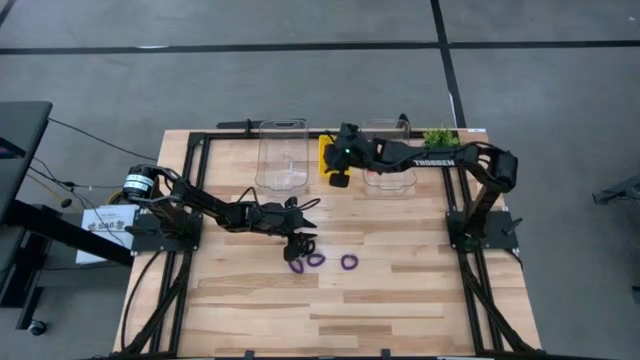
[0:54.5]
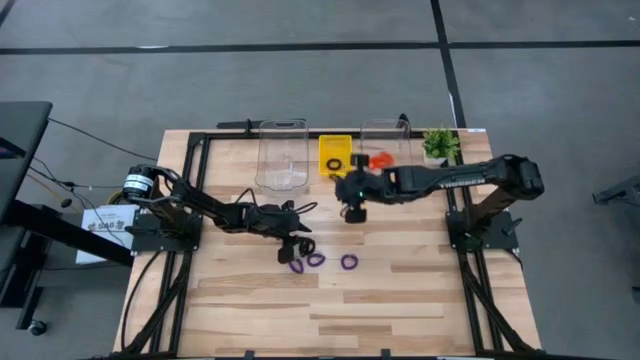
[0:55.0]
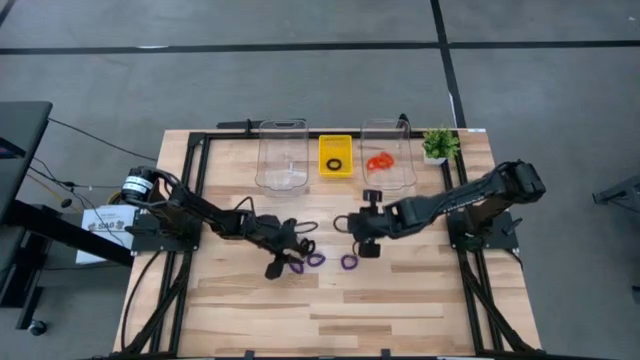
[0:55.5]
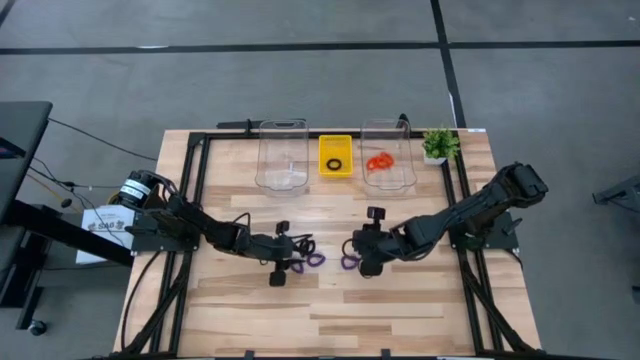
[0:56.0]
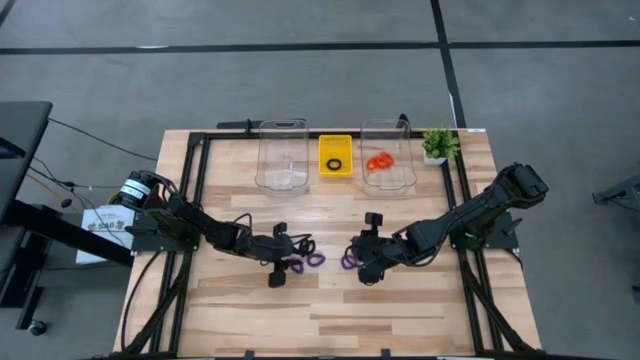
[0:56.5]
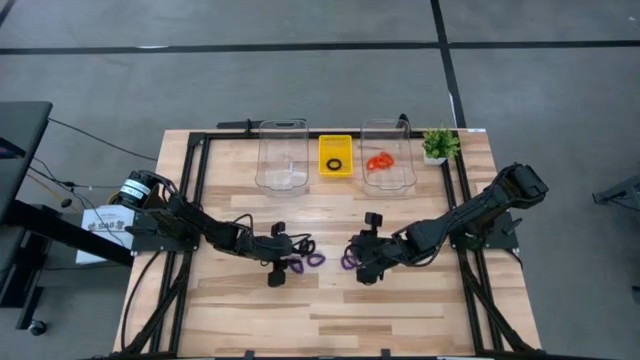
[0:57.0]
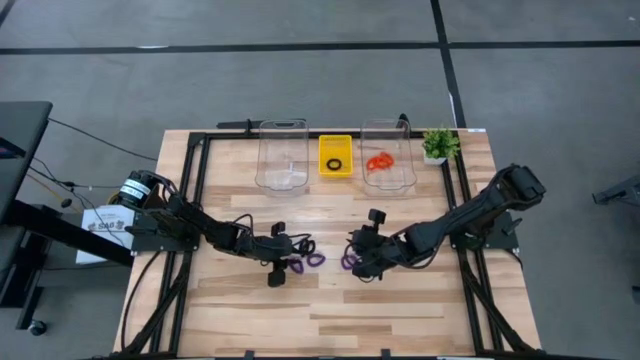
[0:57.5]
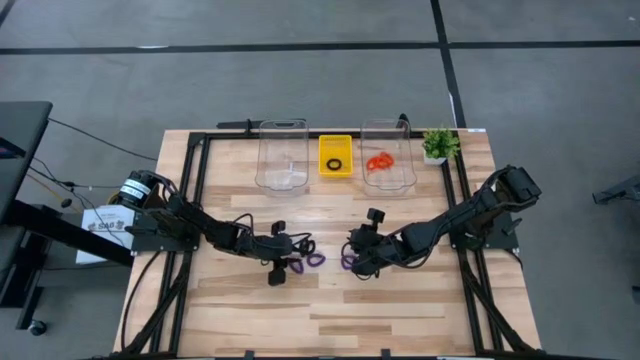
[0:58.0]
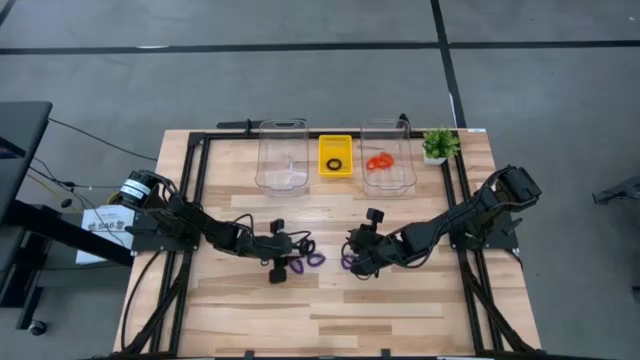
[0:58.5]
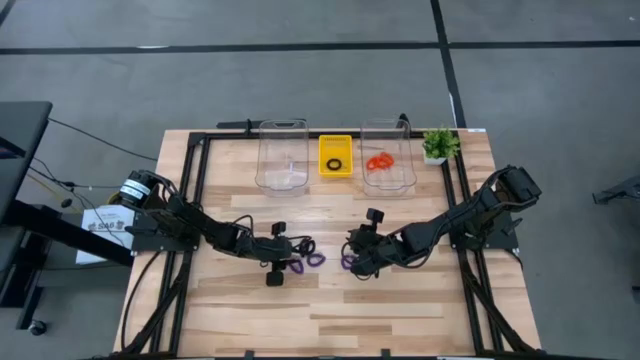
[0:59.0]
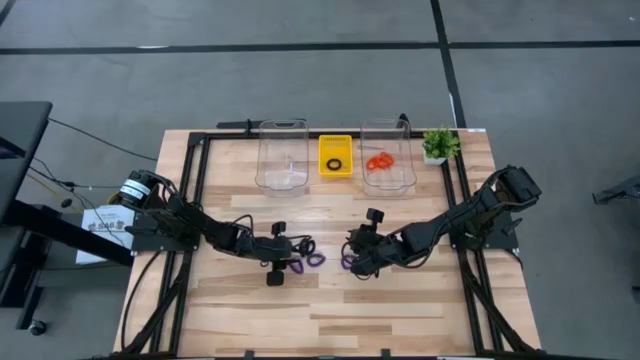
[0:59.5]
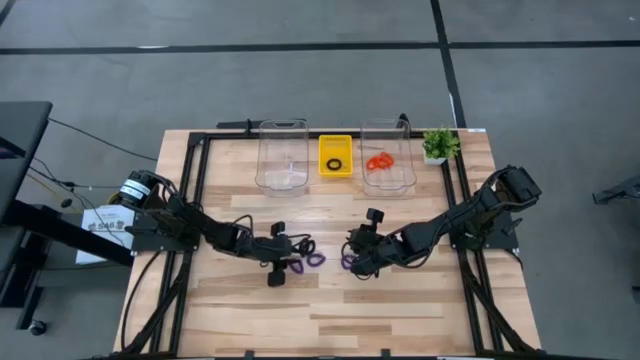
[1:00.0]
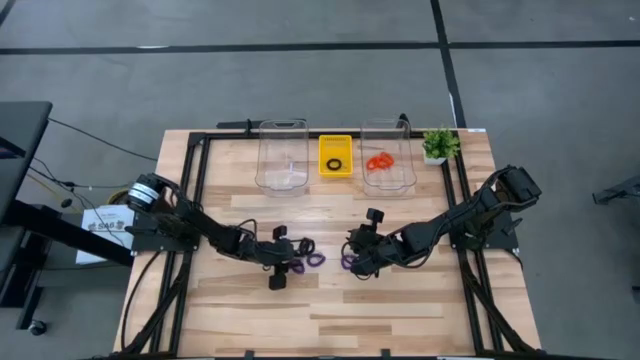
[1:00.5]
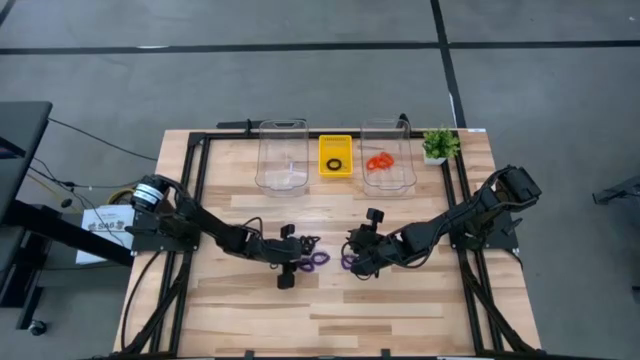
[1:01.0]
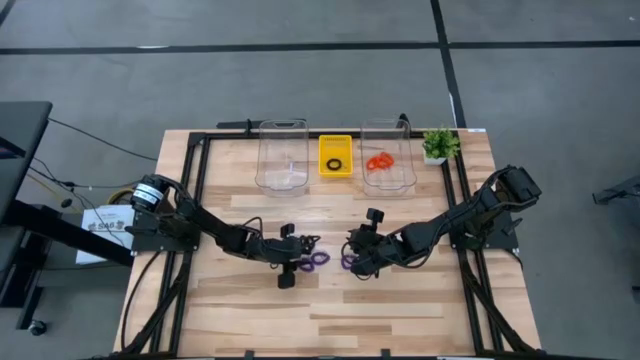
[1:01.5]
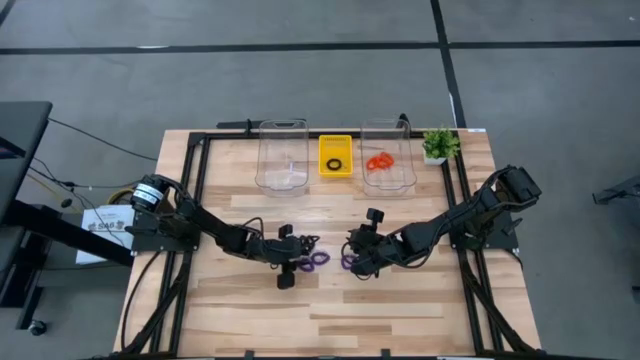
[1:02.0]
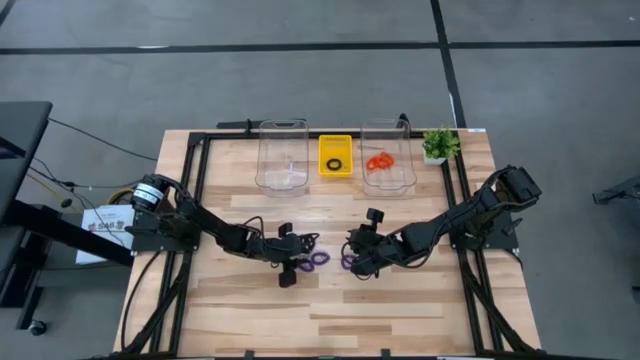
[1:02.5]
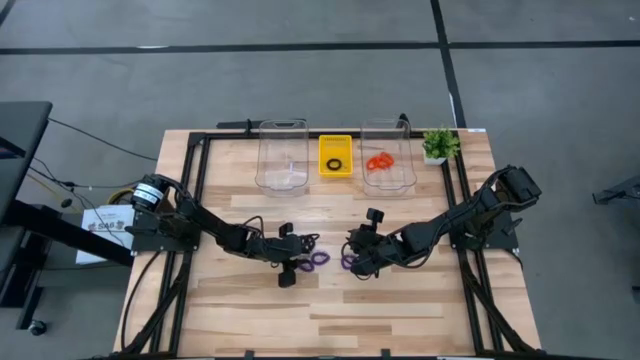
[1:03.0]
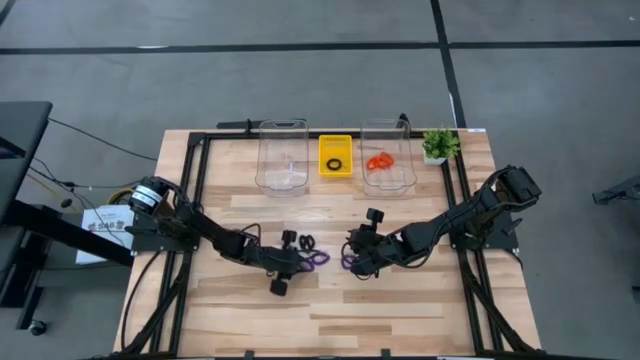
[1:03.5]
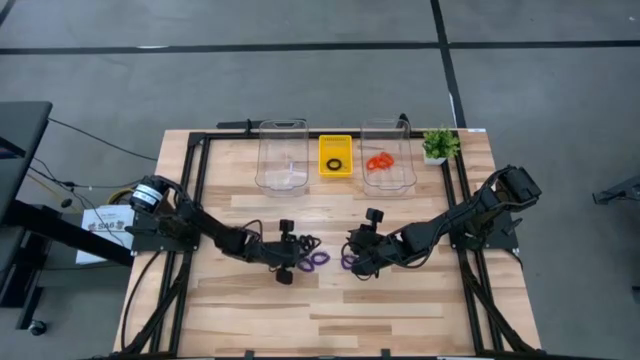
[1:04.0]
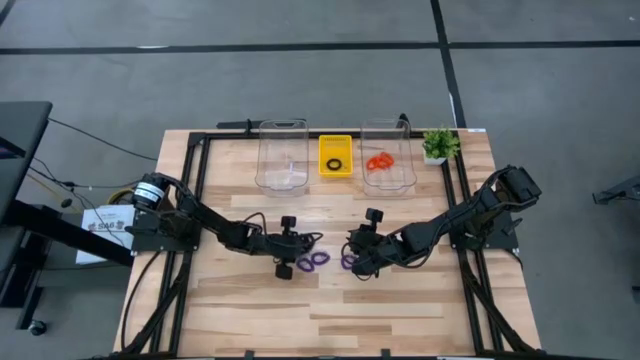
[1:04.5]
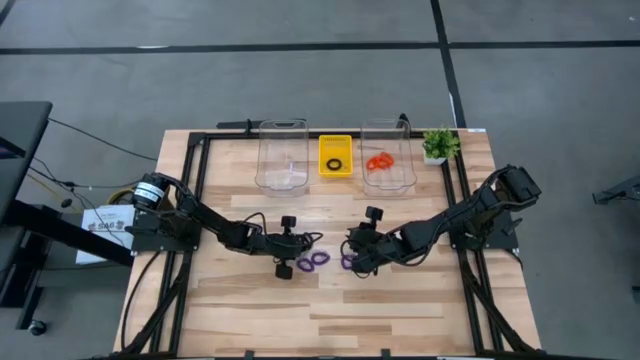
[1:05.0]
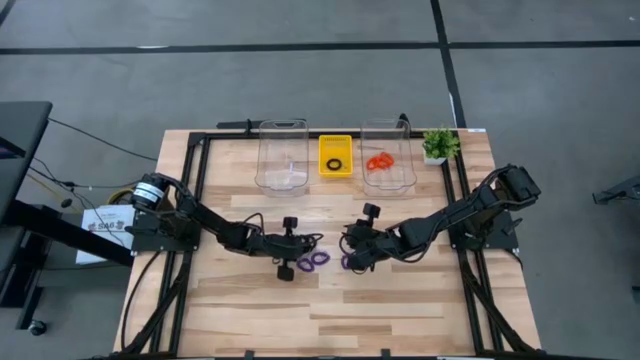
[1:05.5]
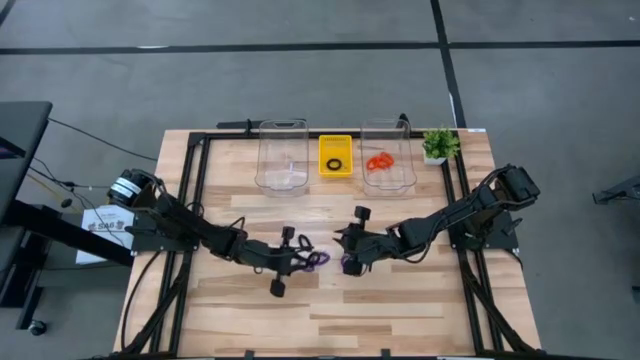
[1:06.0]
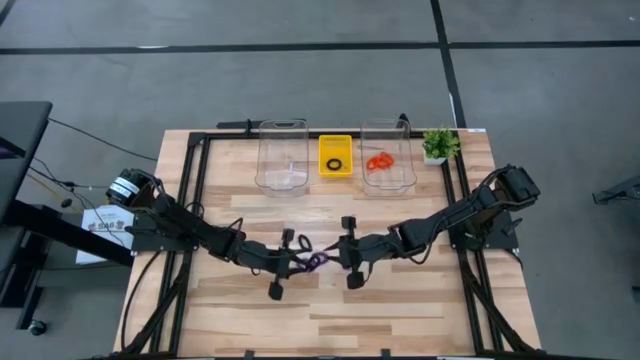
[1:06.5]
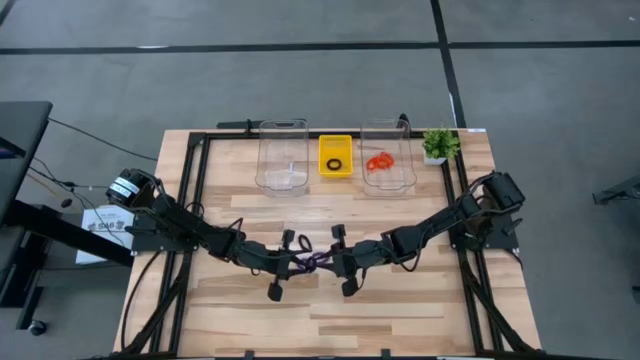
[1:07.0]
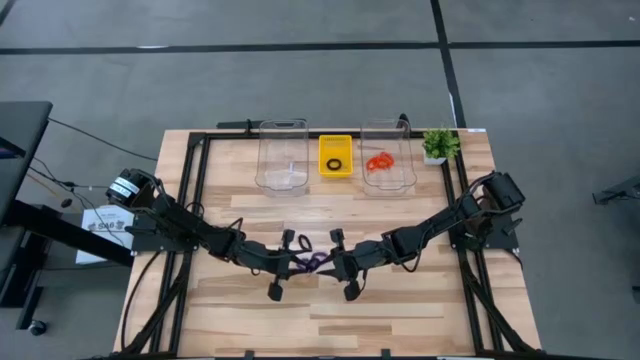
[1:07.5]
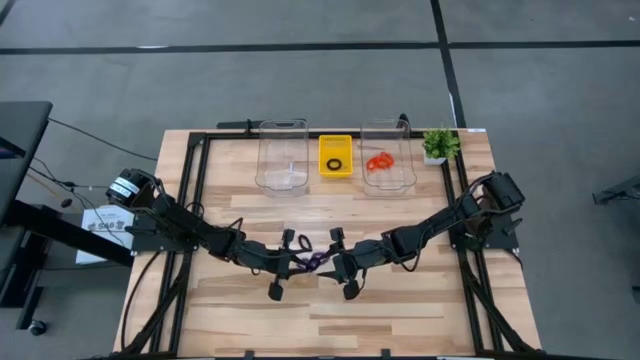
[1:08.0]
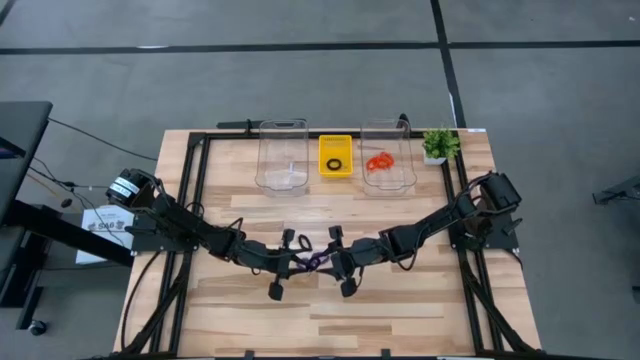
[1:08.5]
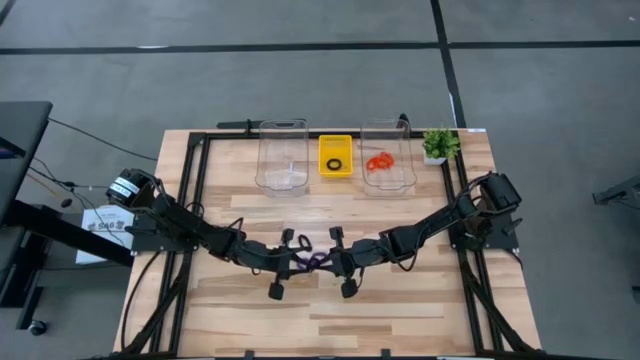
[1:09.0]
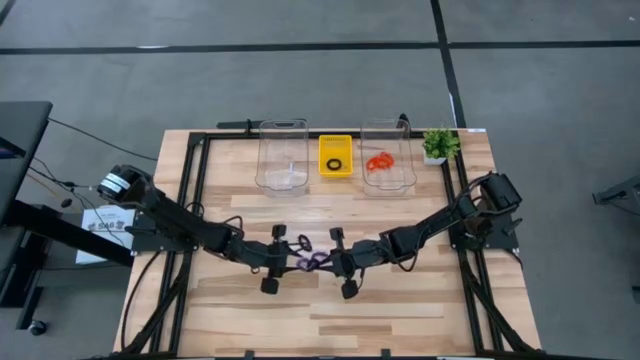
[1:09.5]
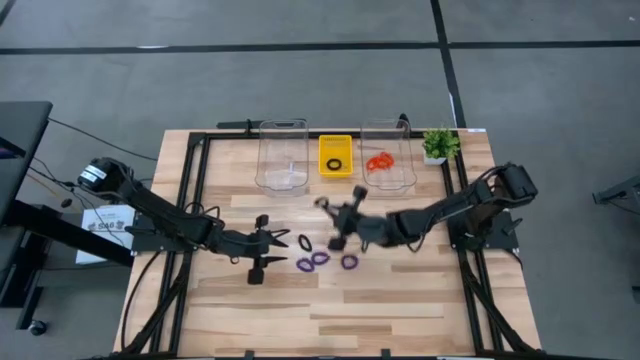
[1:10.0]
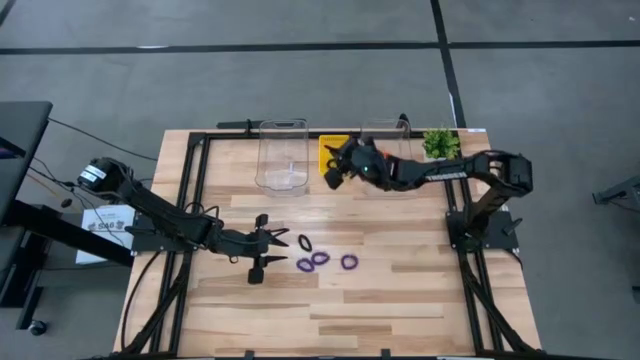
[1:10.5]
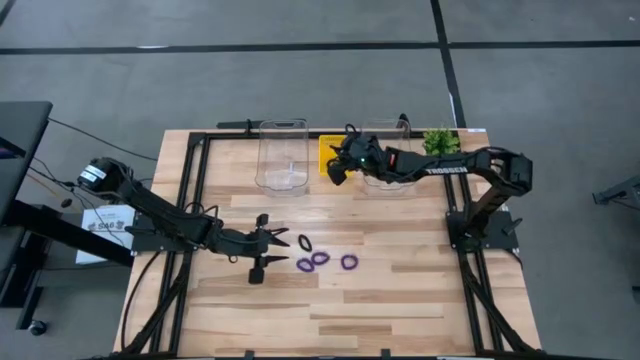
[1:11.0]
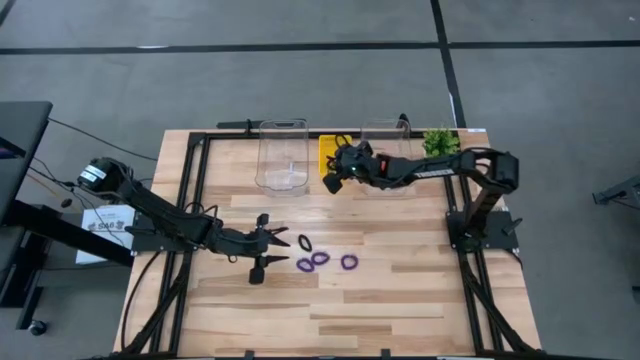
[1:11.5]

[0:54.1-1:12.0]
Task: Sort spring keychains
Put the right black spring keychain into the yellow bin

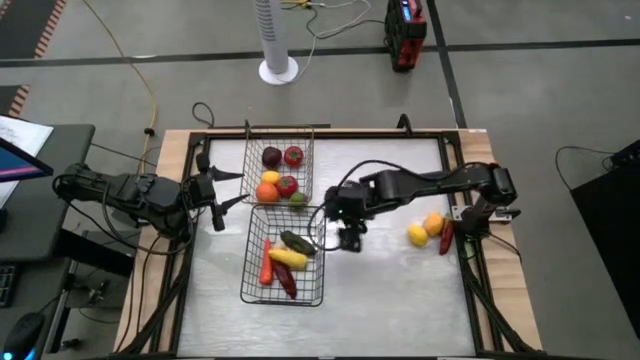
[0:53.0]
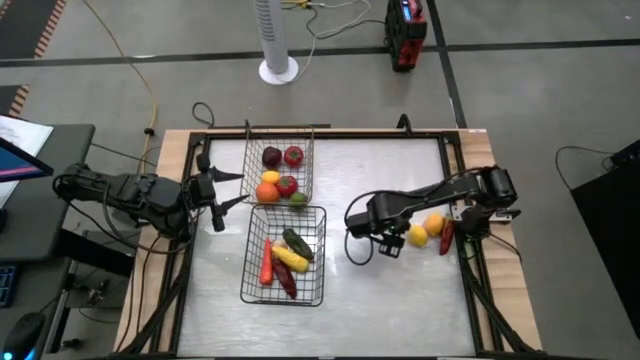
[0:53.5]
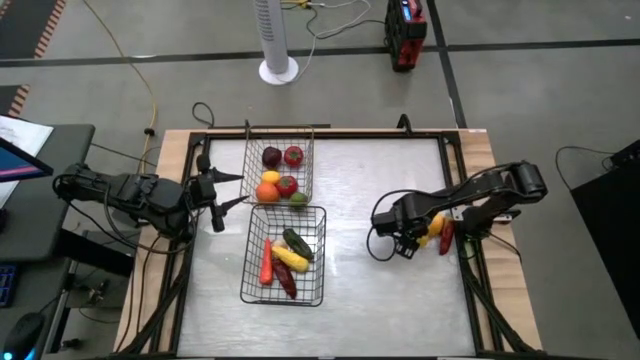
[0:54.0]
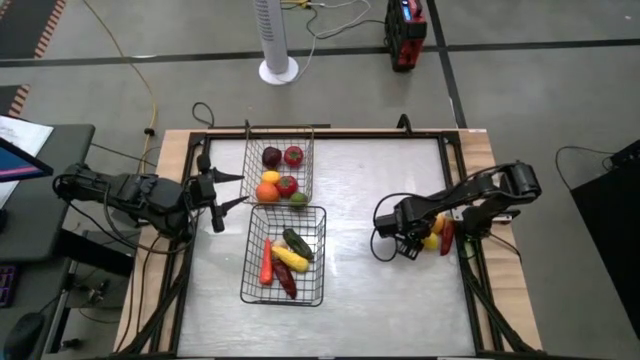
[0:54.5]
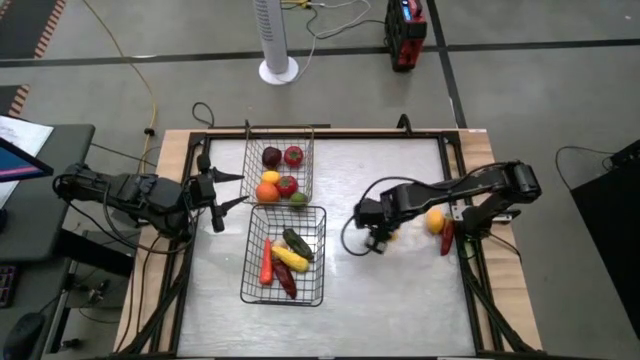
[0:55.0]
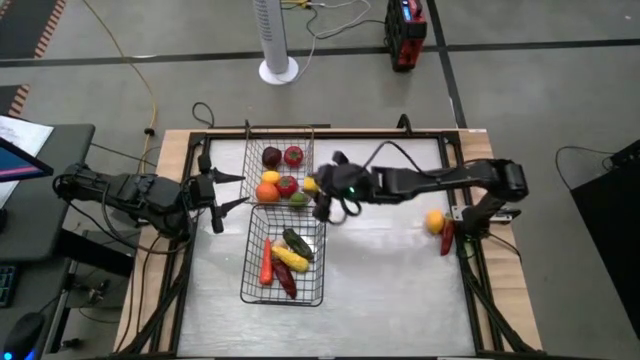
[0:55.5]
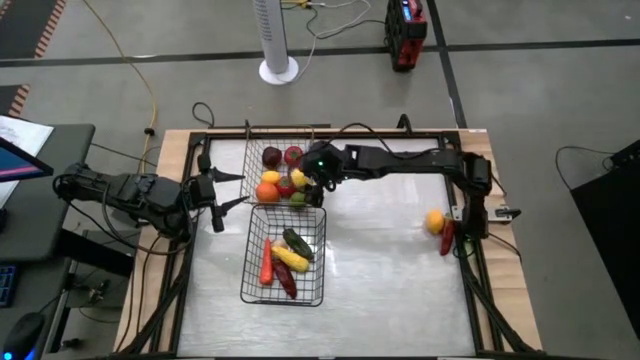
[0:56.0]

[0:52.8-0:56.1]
Task: Sort produce into baskets
Put the left lemon into the gold wire basket

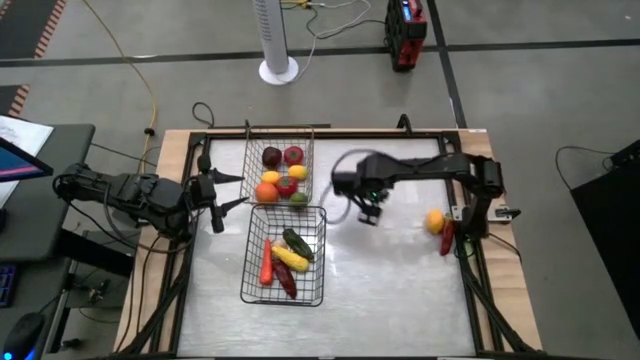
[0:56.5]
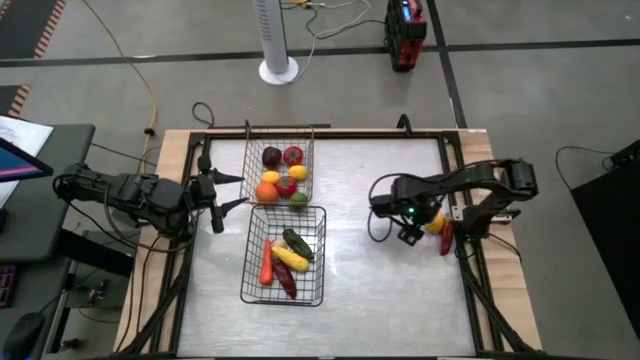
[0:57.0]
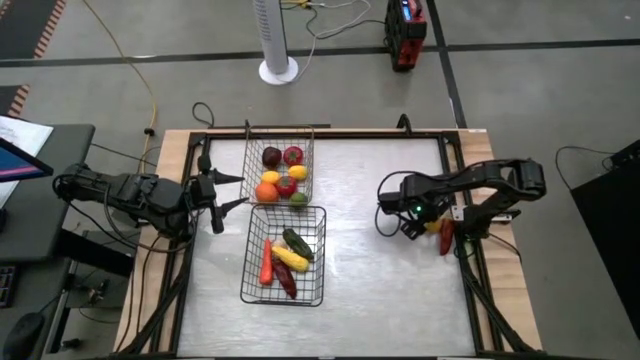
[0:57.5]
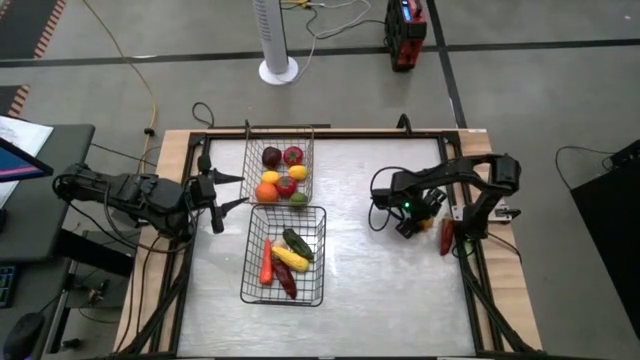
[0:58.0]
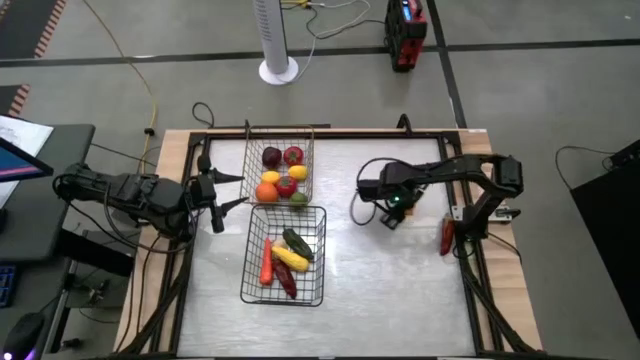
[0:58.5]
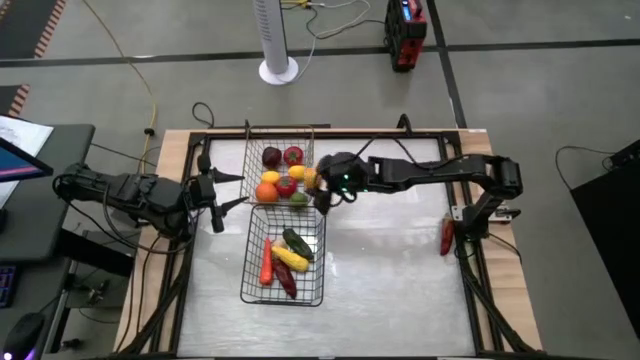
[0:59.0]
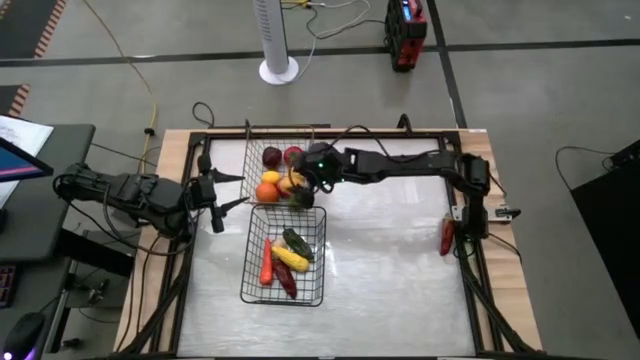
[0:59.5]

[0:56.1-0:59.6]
Put the lemon into the gold wire basket
